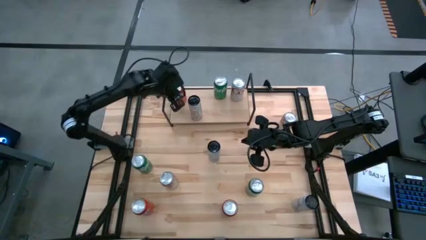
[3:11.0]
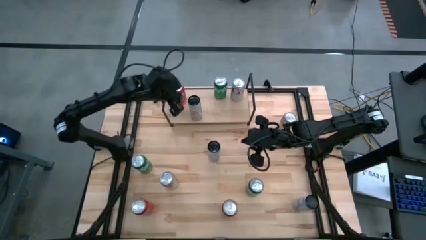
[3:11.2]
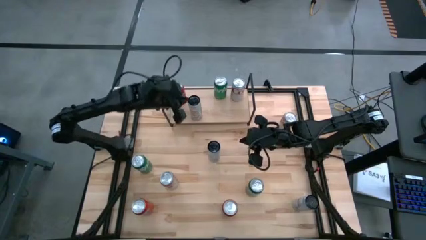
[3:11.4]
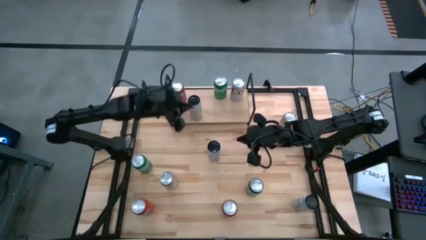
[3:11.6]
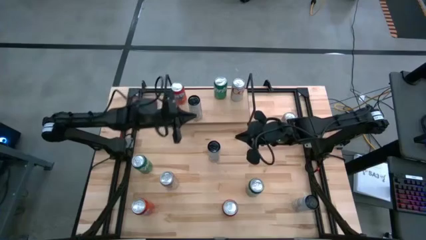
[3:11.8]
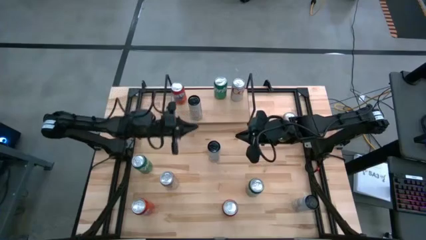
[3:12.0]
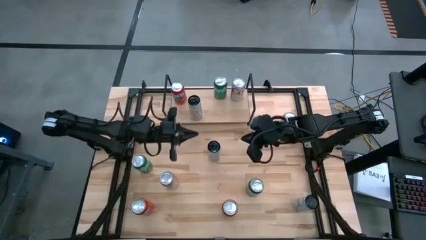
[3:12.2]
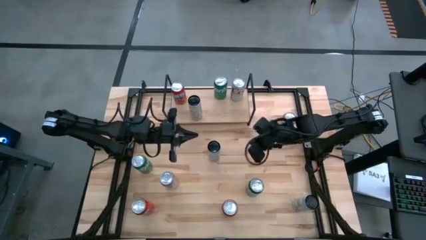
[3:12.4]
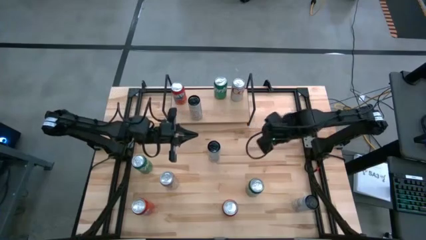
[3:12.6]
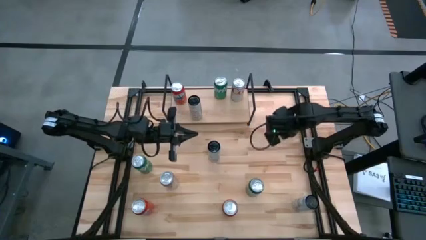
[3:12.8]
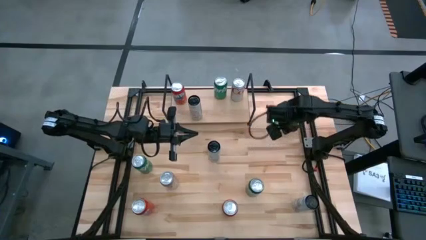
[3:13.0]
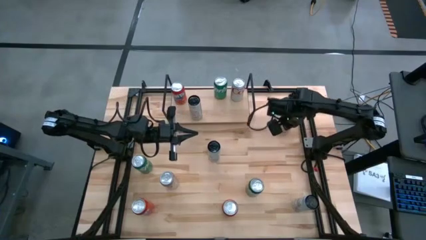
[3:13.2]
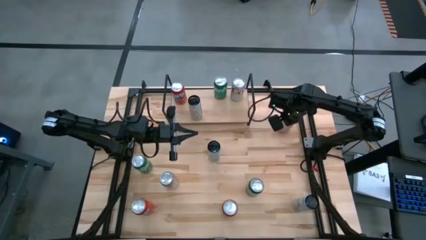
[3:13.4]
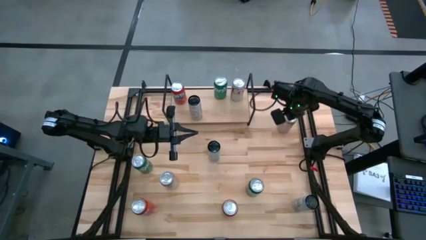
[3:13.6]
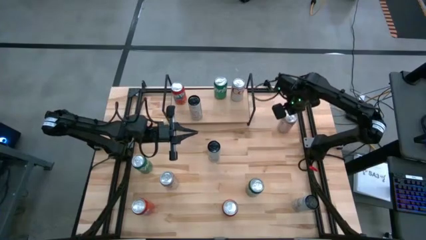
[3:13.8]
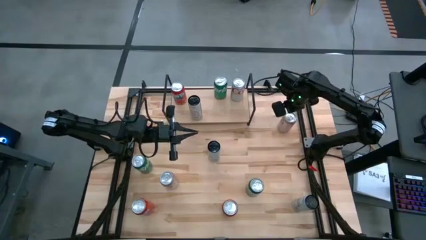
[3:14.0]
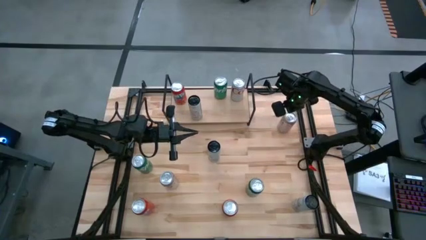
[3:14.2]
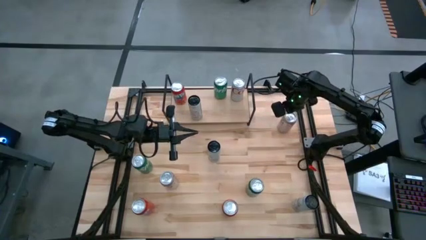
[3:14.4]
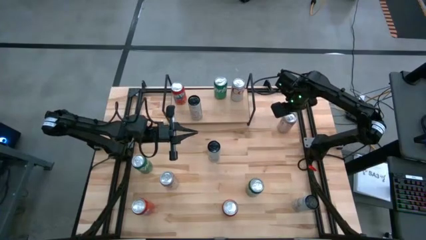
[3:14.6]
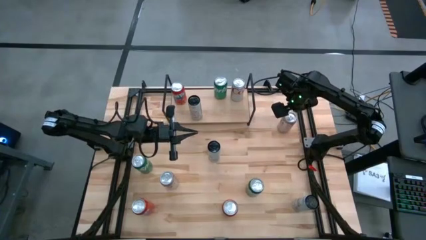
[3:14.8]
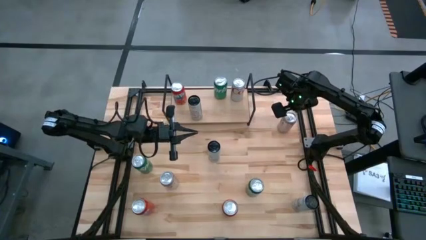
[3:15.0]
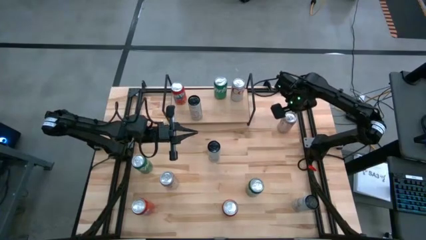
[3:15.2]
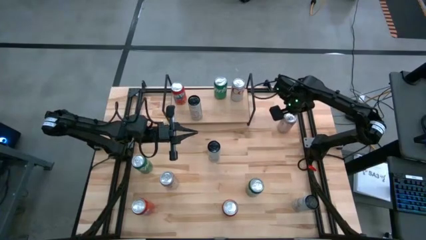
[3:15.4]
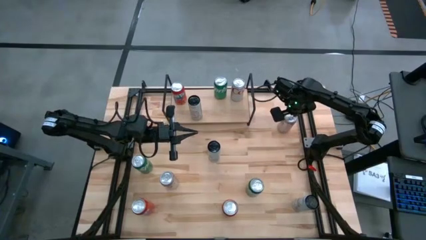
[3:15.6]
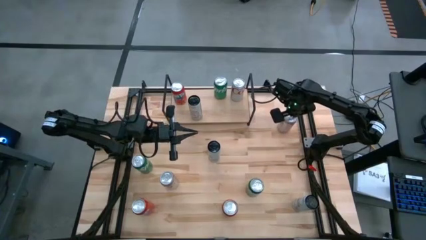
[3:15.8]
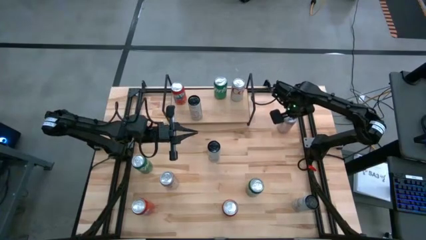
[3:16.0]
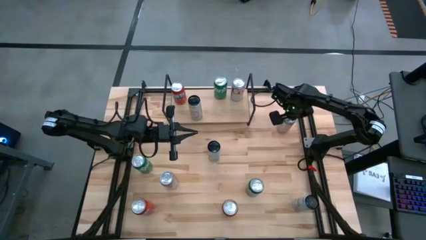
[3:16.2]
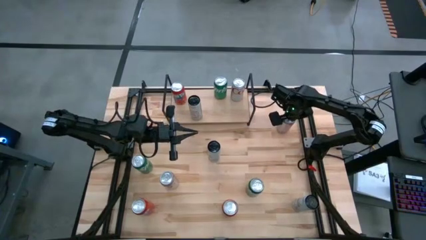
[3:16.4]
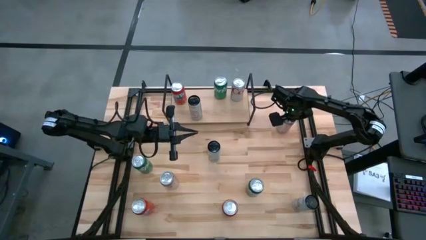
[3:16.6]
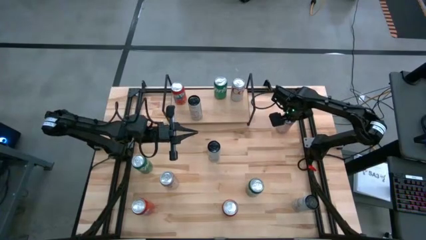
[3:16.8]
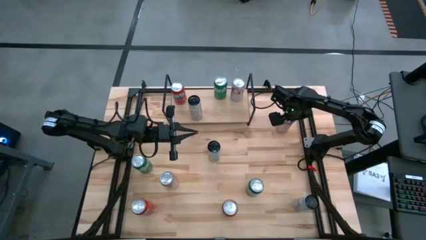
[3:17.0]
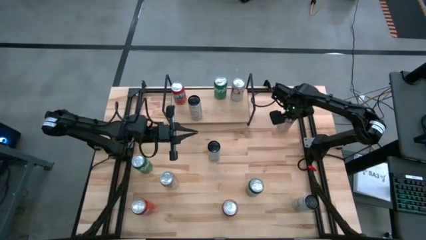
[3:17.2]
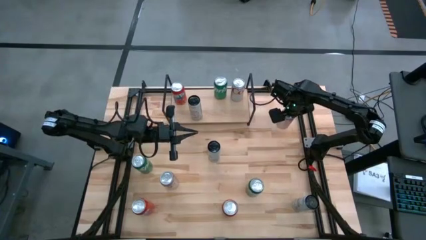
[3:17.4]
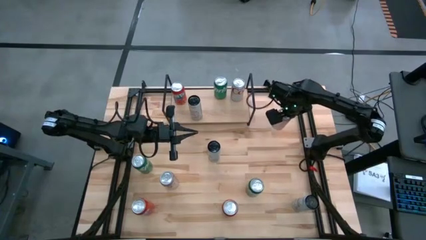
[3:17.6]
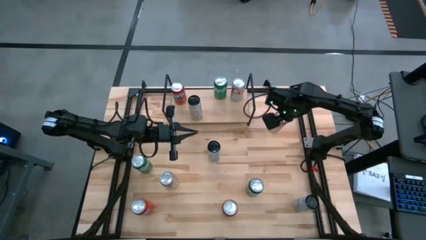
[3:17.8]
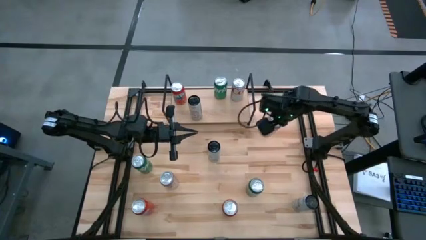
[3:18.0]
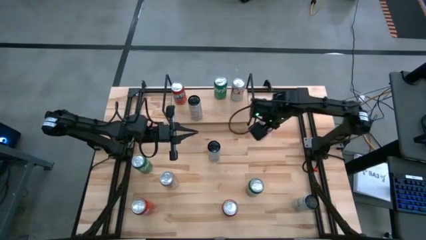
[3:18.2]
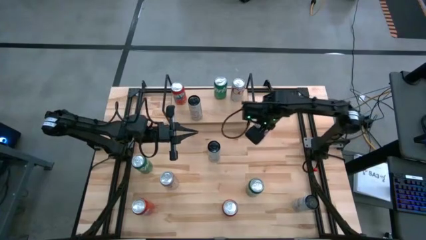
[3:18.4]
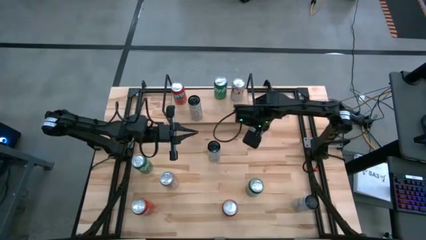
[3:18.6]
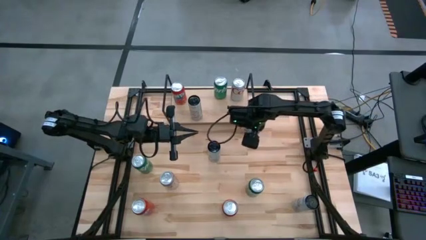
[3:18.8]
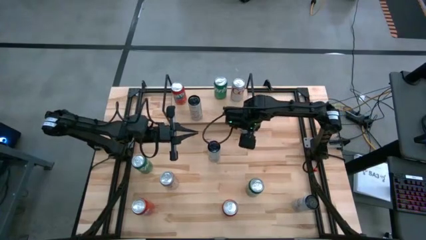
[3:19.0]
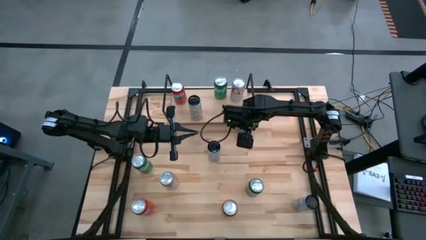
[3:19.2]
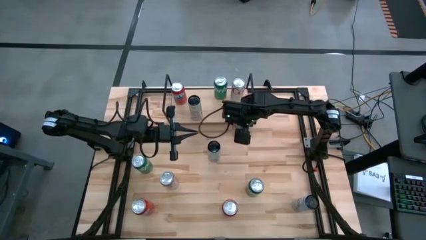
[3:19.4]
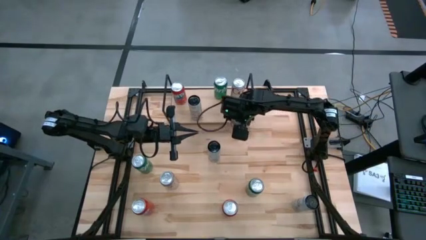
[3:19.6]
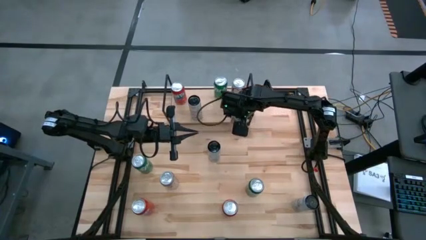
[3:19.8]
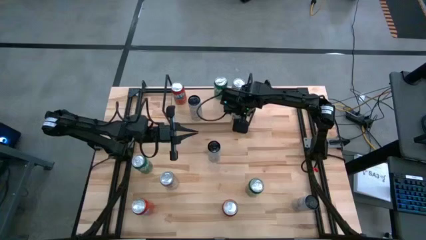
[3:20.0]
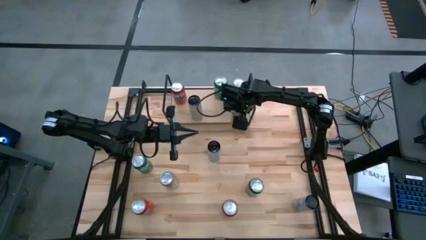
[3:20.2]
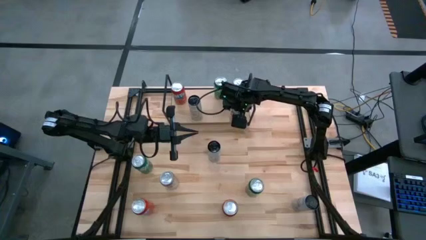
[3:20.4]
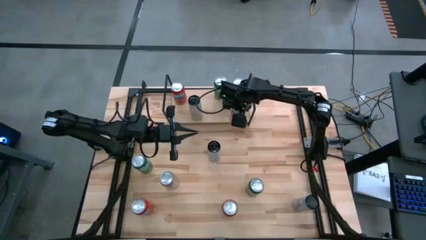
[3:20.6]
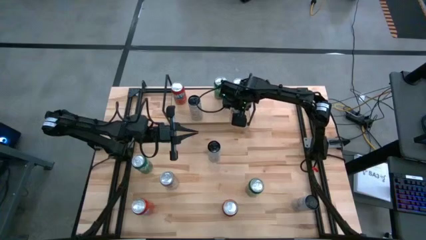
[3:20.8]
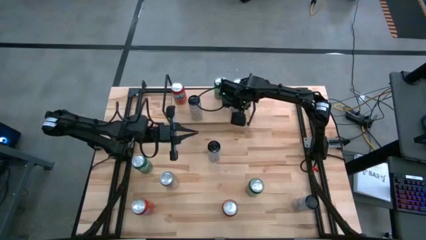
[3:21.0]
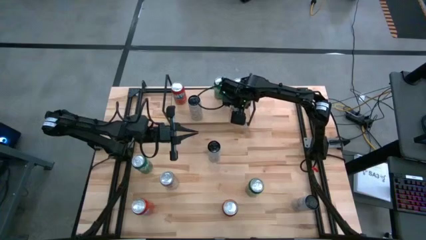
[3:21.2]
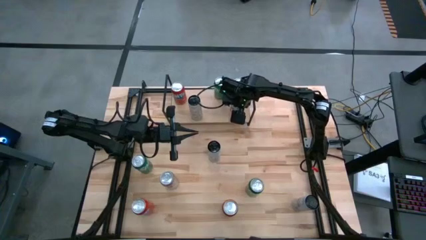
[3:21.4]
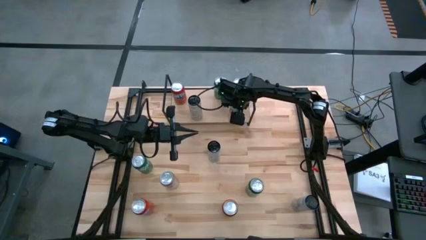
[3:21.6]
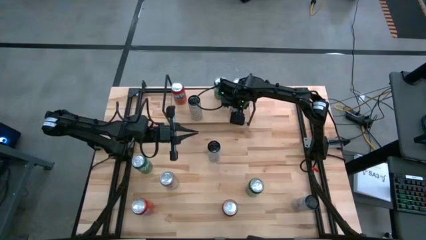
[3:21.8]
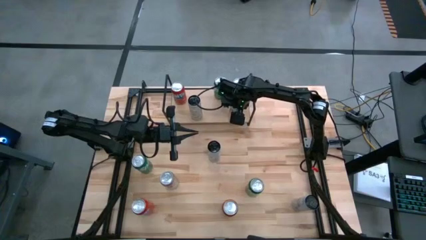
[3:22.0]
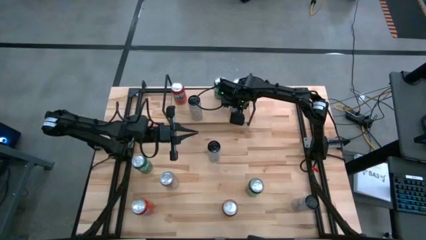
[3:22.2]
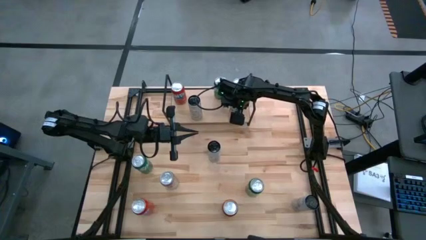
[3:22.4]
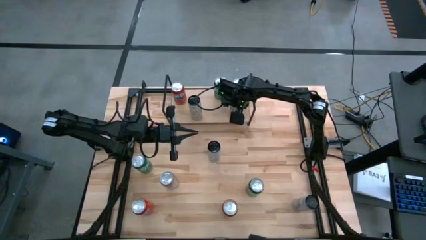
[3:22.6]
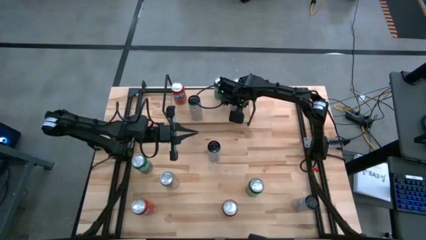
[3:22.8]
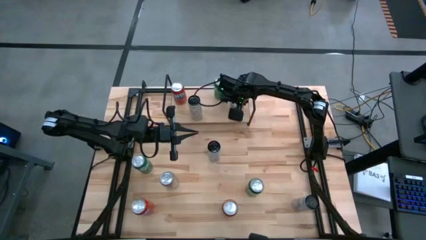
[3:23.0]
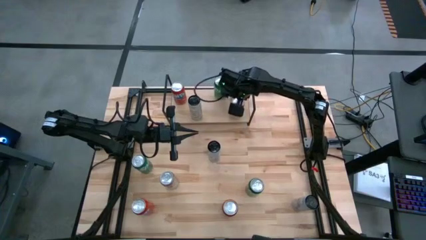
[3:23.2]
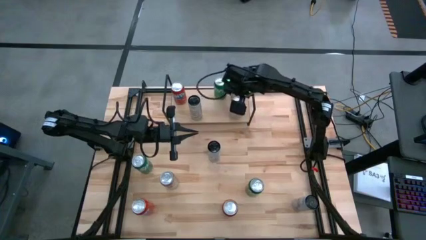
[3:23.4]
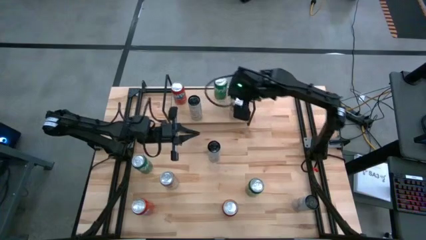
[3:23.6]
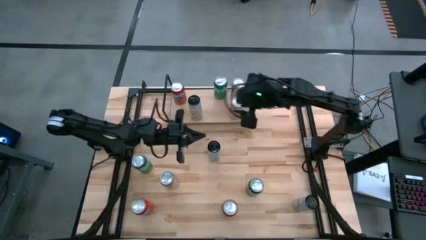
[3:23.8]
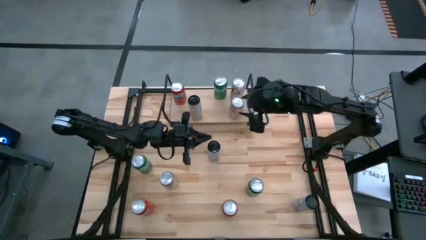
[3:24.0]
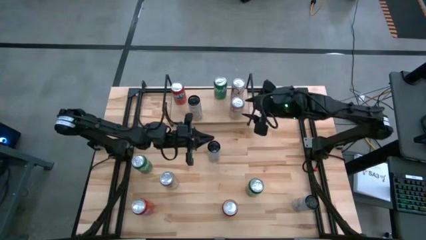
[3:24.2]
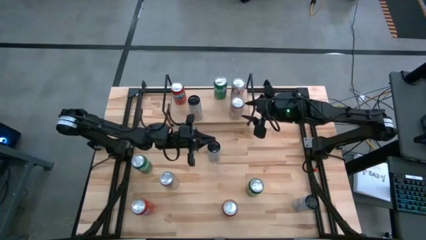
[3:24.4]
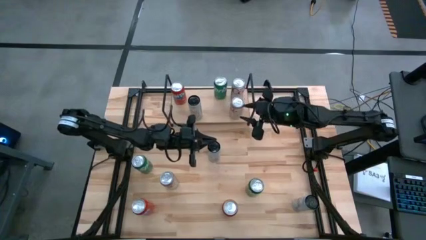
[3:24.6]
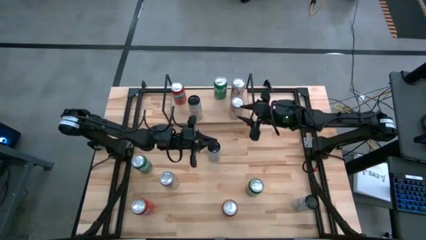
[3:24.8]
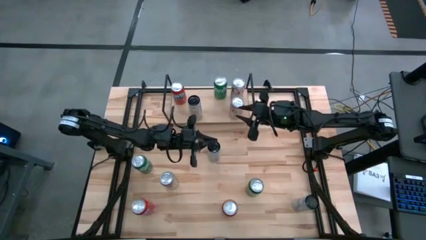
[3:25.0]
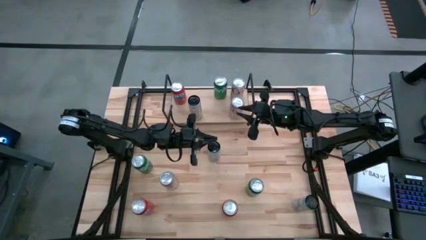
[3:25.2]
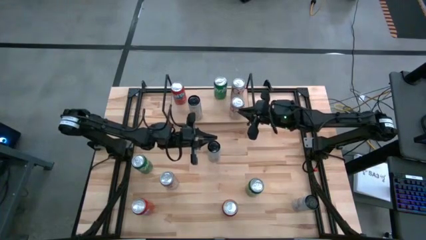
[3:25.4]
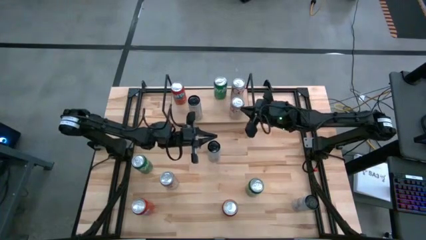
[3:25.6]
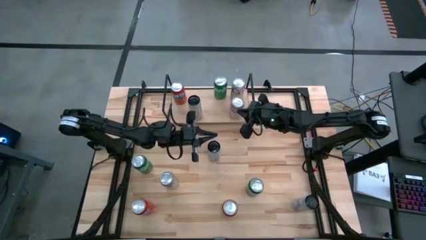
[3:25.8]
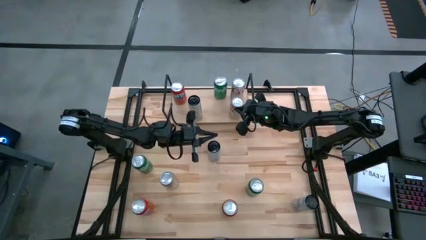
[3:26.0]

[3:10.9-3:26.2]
Task: Sort soda cans
Put the top red silver soda can on the shelf and align it with the other red silver soda can
